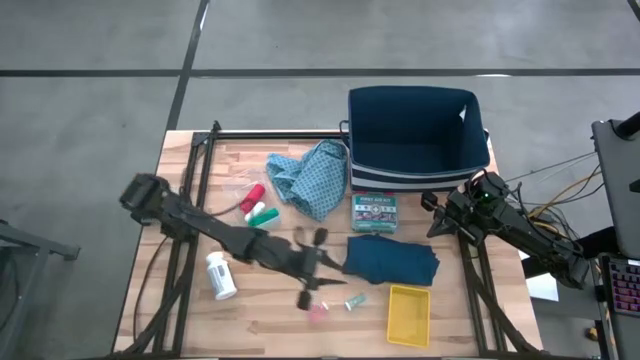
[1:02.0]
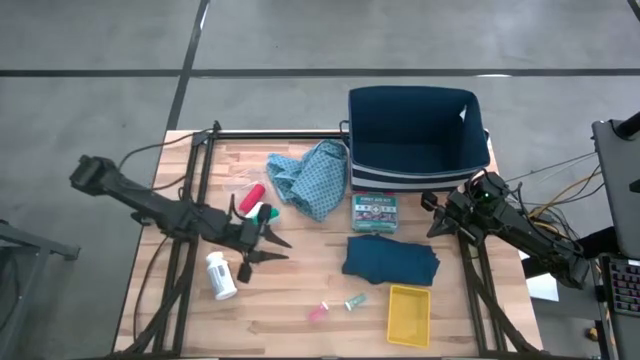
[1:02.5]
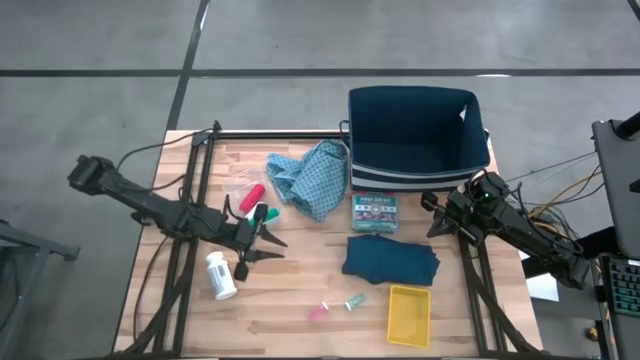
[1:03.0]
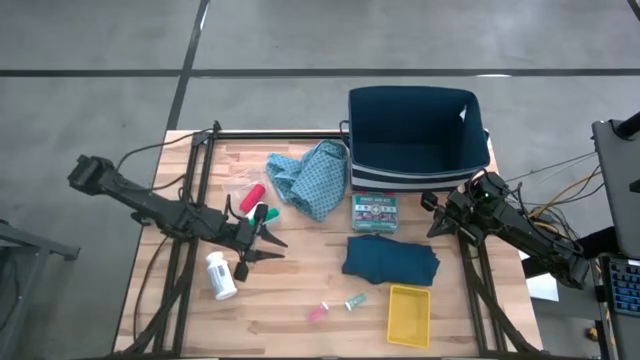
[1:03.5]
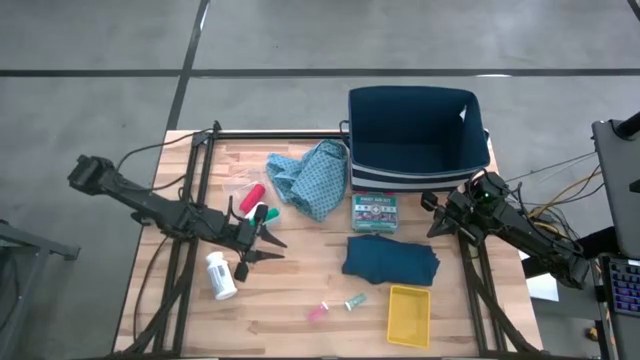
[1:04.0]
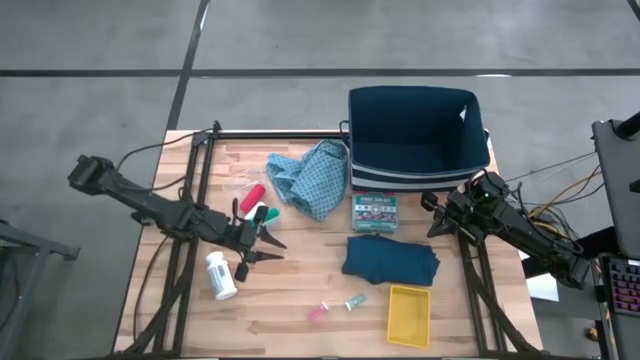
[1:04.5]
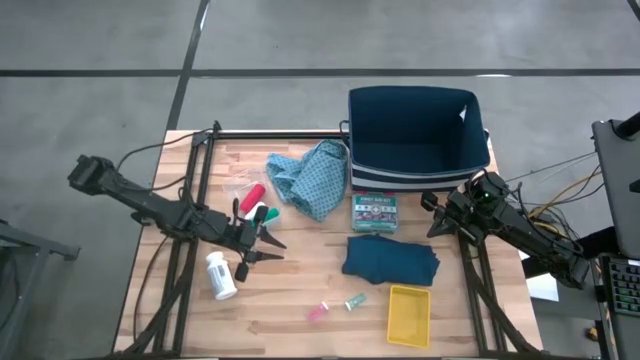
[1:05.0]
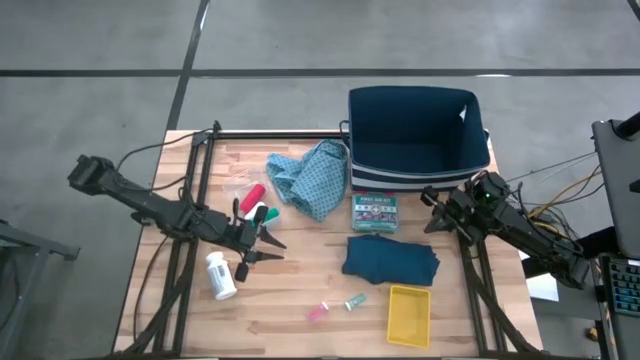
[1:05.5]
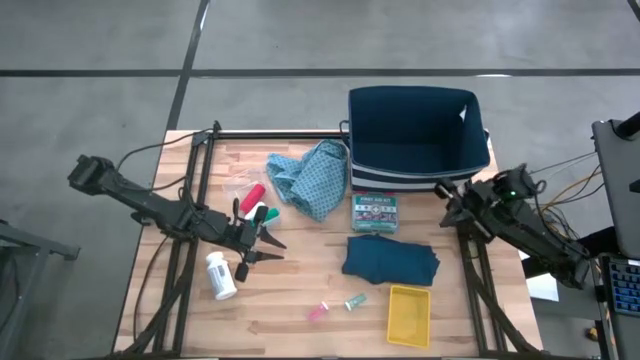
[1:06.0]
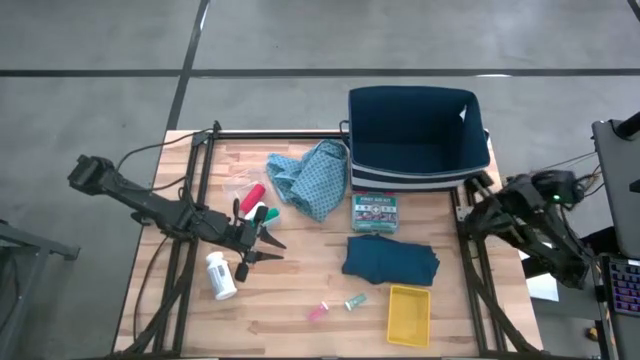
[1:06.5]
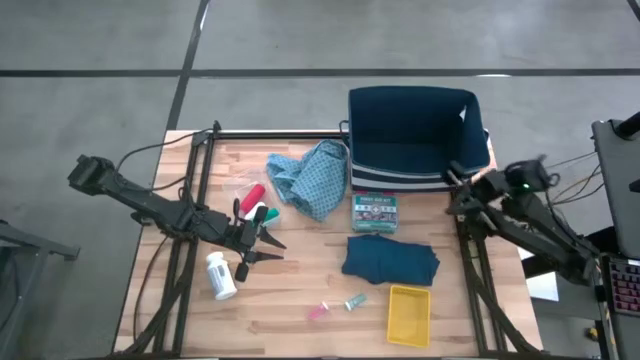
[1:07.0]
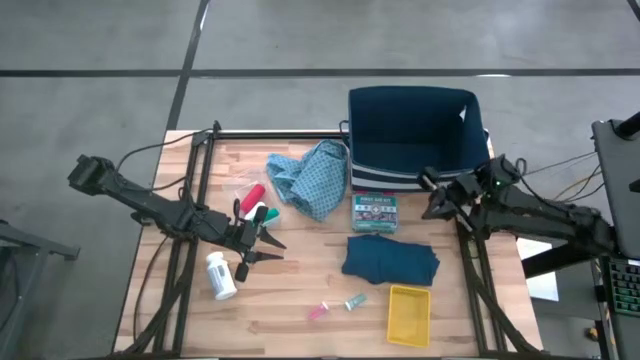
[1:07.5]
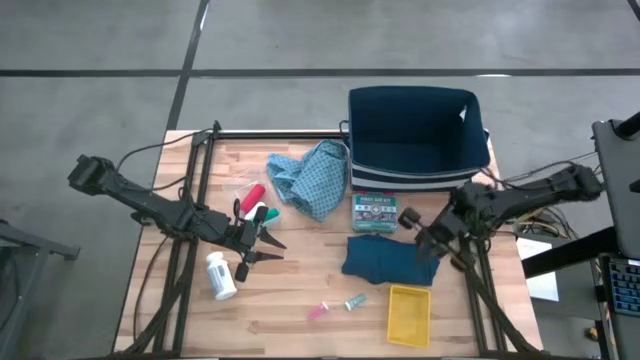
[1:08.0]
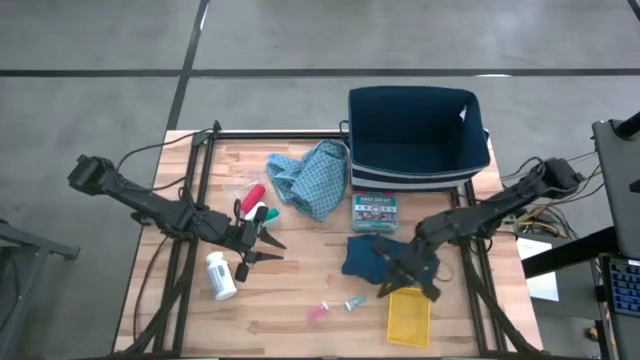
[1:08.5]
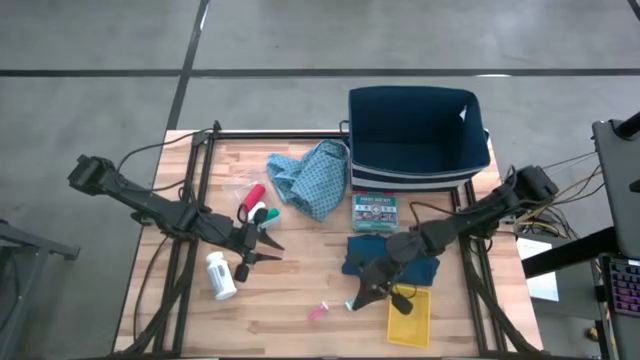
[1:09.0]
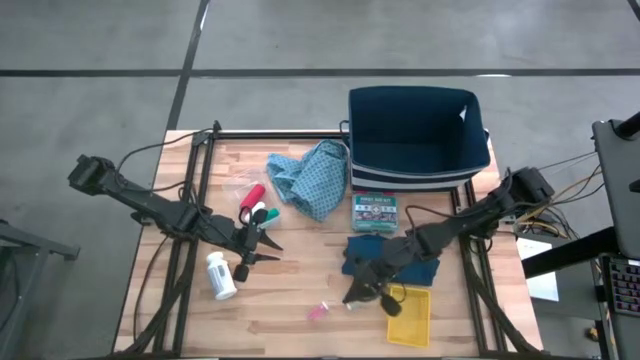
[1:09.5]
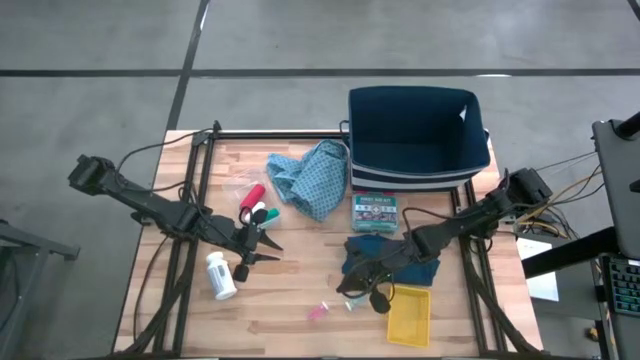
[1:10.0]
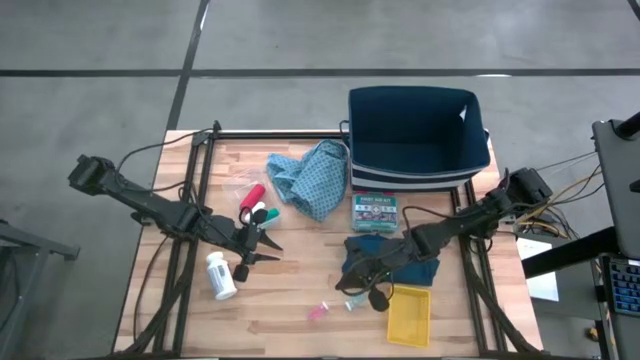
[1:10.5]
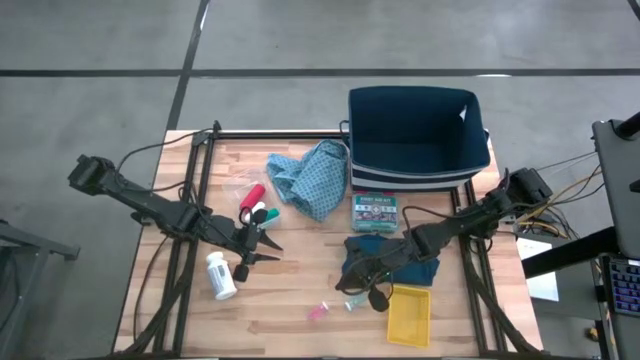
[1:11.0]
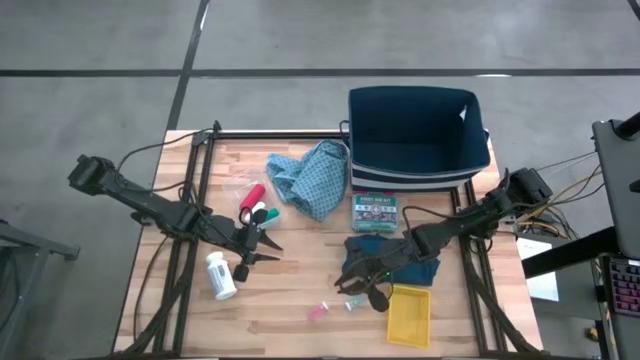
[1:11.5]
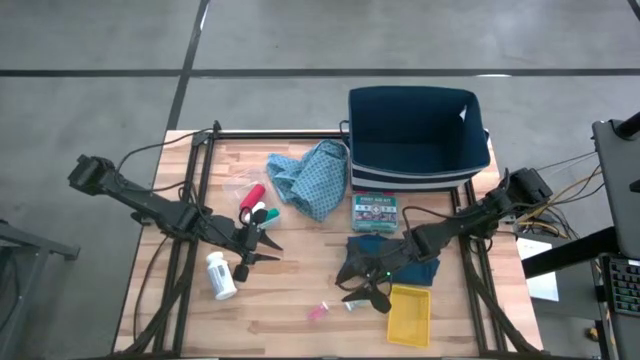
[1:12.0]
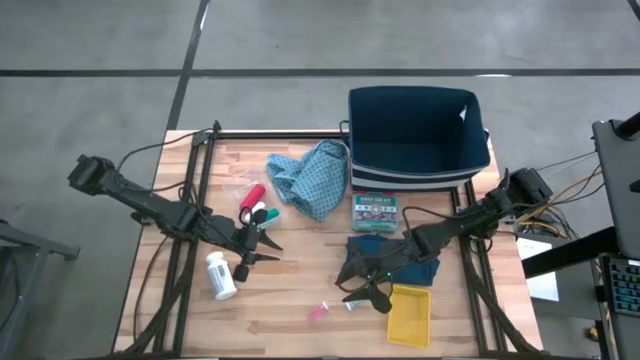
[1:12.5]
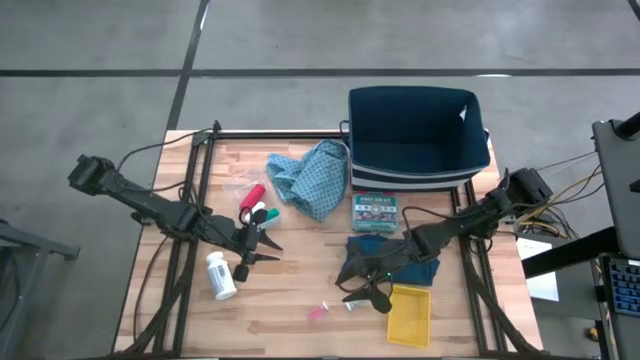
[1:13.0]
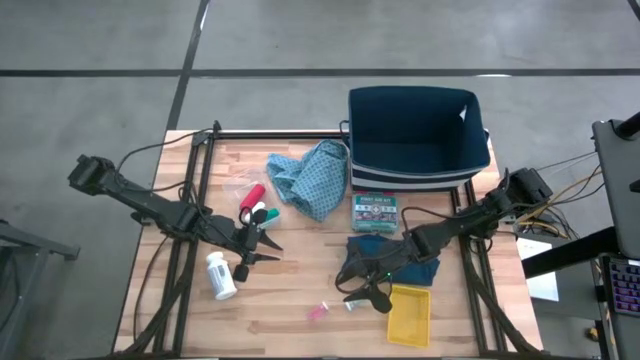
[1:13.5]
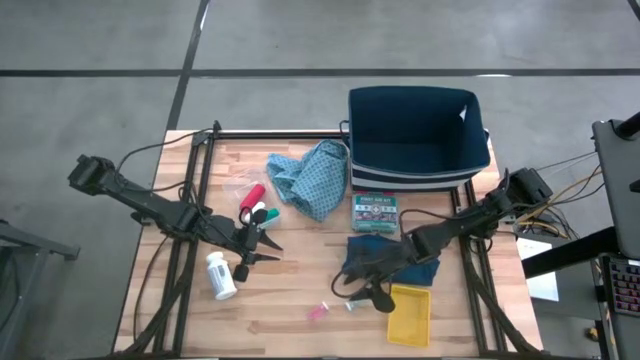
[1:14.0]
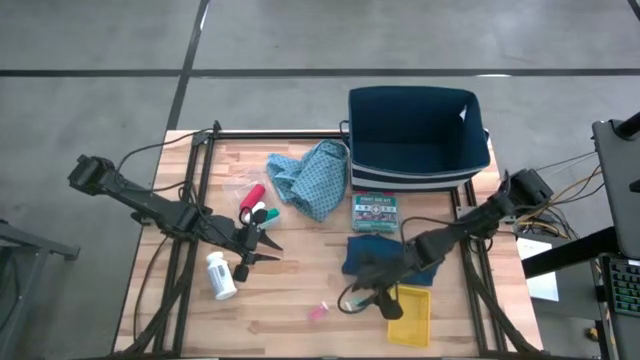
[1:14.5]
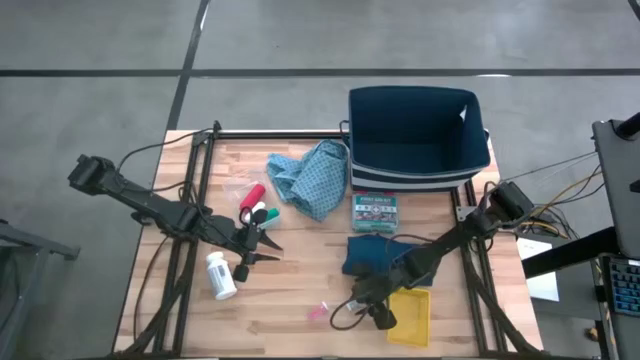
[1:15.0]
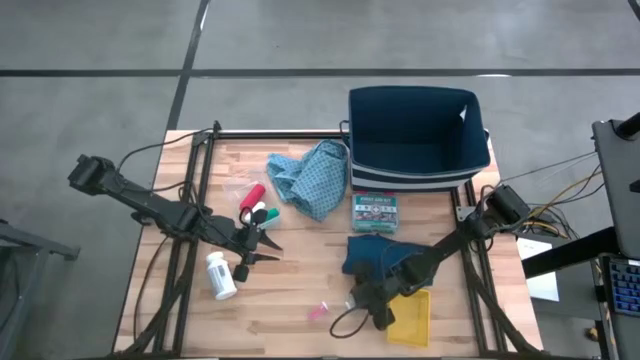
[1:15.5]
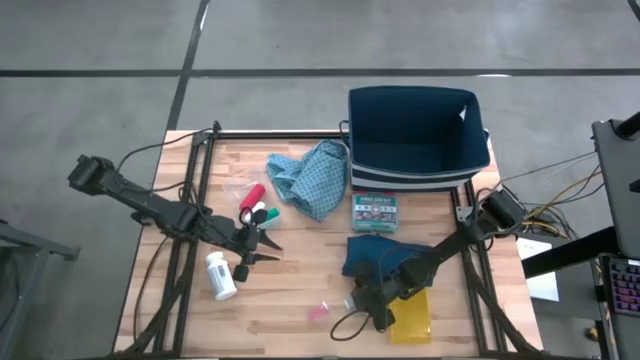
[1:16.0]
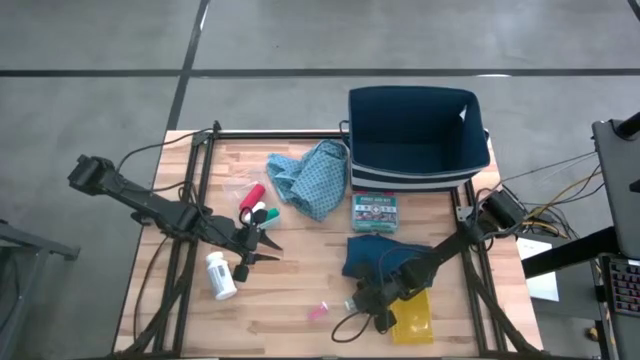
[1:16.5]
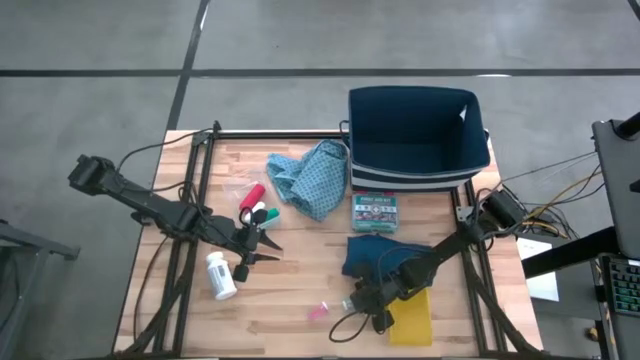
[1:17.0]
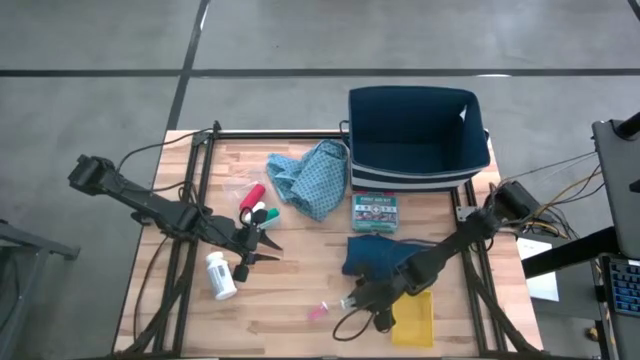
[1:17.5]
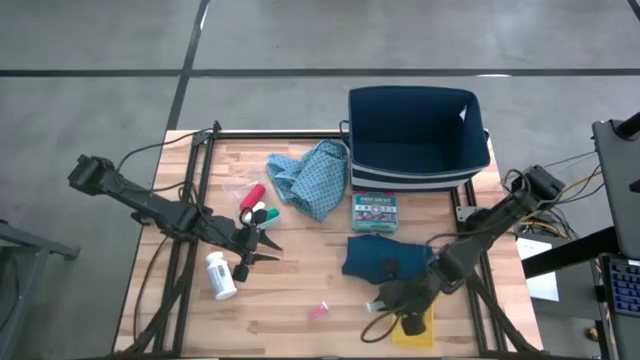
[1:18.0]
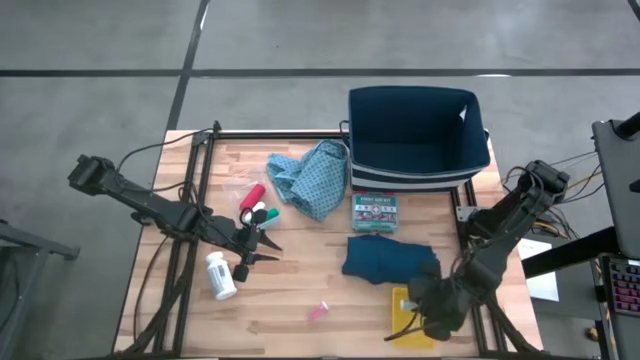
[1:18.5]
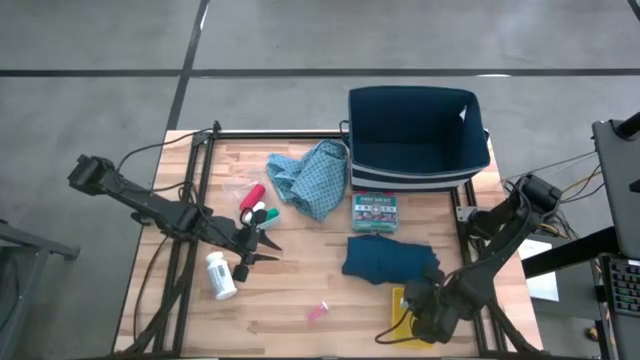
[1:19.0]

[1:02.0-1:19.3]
Task: Pick & place medical supplies in basket/bin
Put the blue pill bottle into the yellow bin
